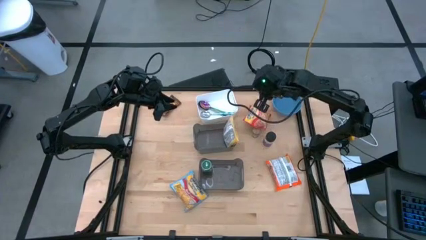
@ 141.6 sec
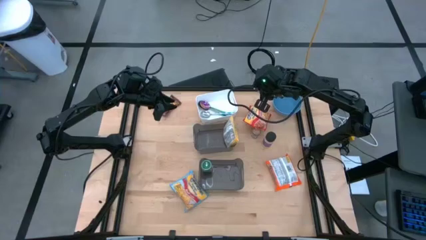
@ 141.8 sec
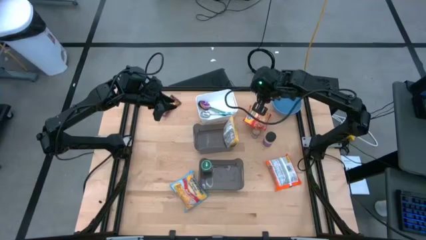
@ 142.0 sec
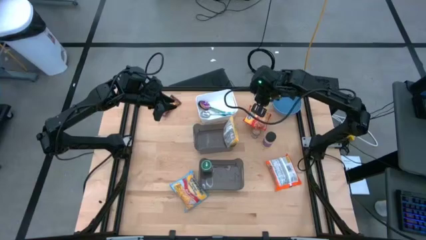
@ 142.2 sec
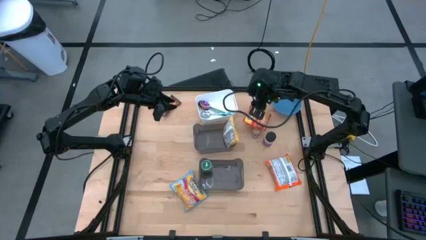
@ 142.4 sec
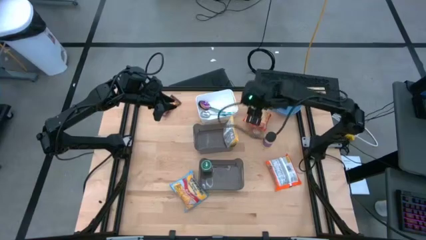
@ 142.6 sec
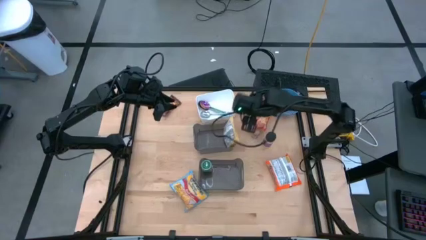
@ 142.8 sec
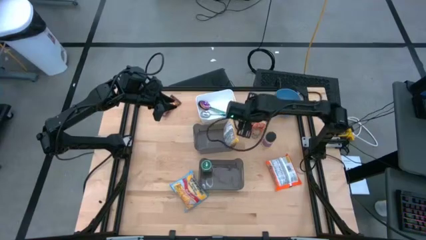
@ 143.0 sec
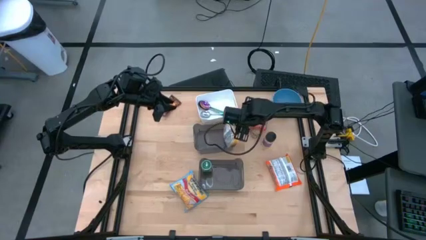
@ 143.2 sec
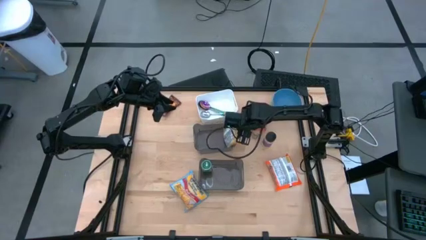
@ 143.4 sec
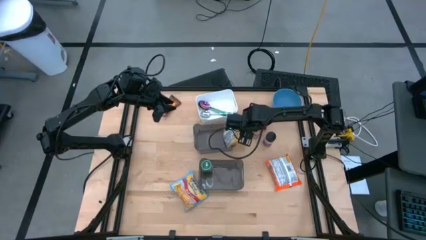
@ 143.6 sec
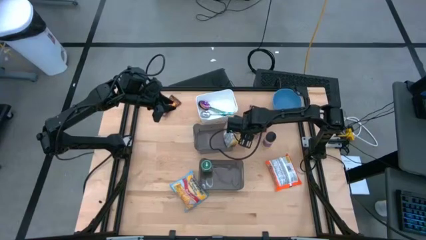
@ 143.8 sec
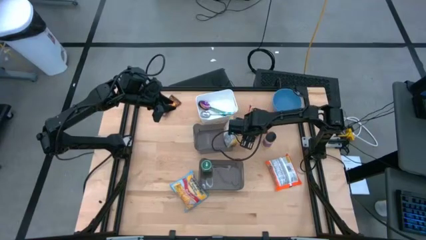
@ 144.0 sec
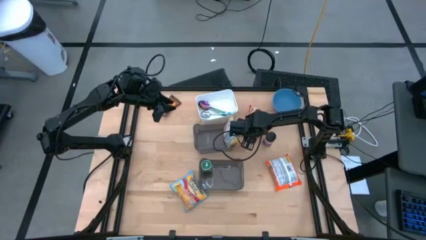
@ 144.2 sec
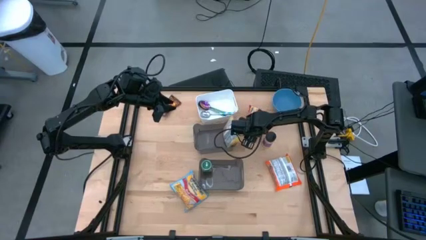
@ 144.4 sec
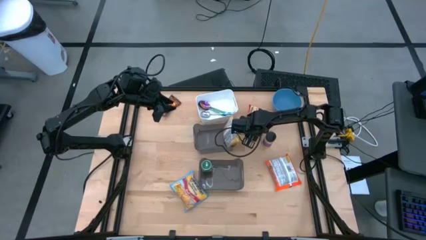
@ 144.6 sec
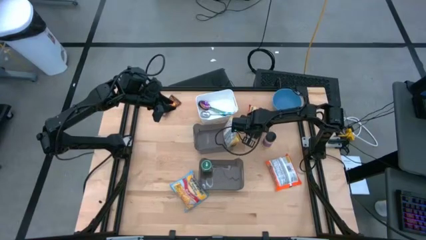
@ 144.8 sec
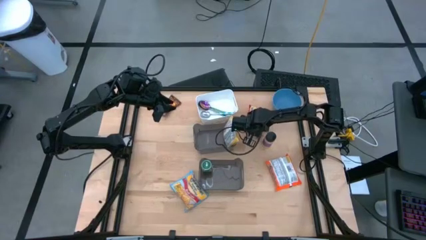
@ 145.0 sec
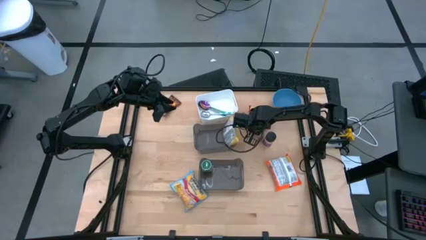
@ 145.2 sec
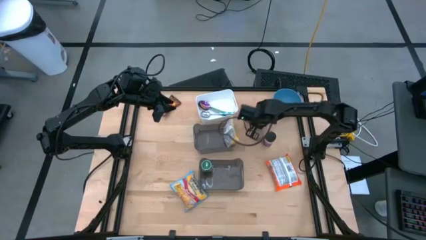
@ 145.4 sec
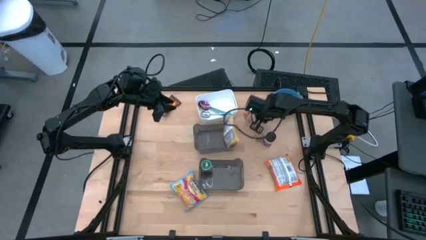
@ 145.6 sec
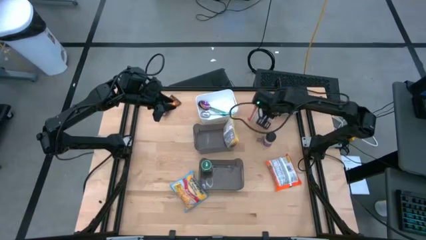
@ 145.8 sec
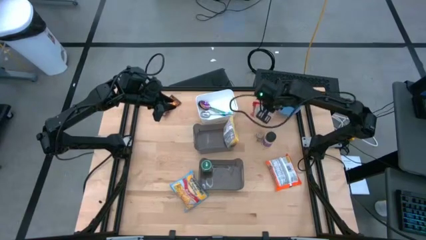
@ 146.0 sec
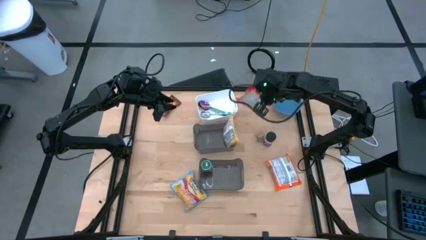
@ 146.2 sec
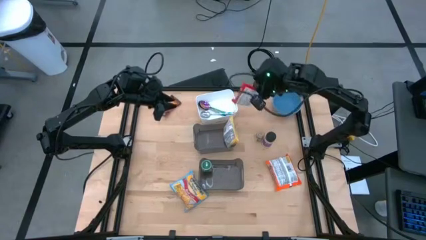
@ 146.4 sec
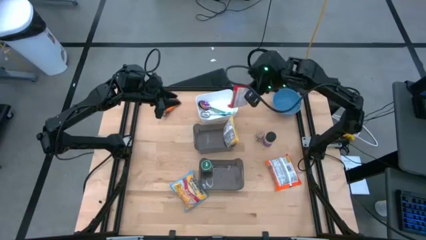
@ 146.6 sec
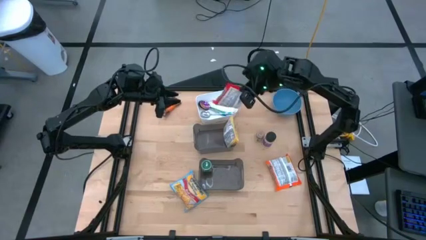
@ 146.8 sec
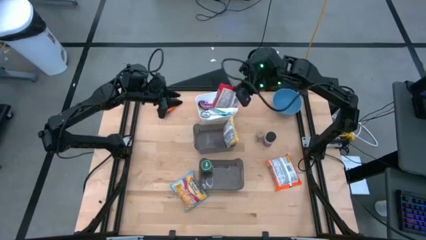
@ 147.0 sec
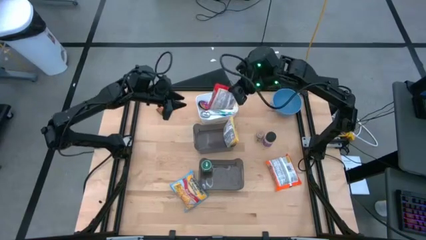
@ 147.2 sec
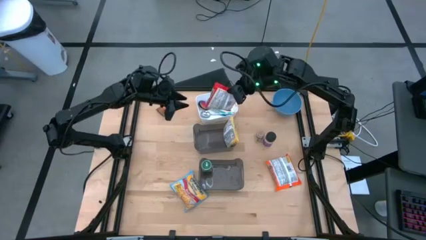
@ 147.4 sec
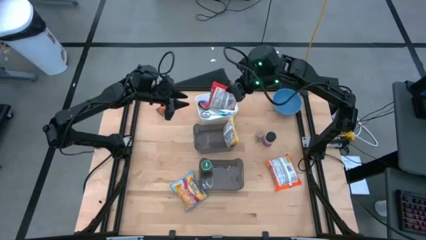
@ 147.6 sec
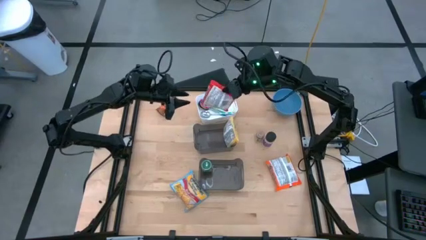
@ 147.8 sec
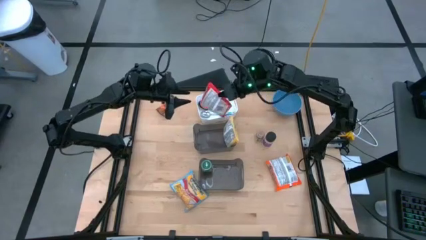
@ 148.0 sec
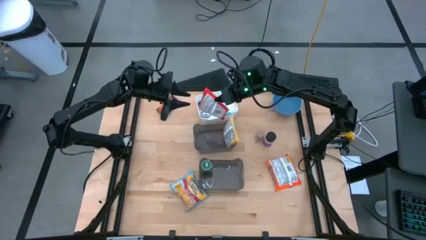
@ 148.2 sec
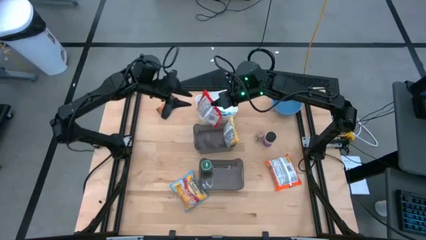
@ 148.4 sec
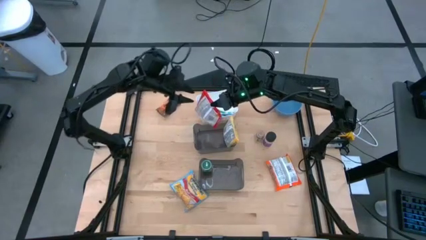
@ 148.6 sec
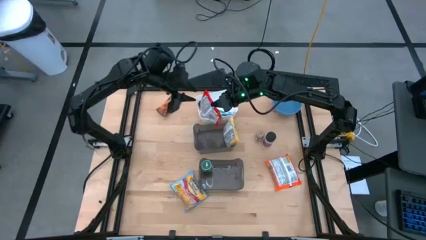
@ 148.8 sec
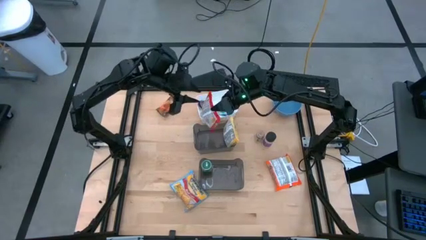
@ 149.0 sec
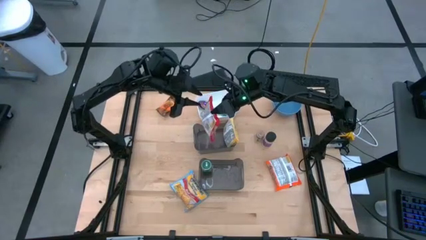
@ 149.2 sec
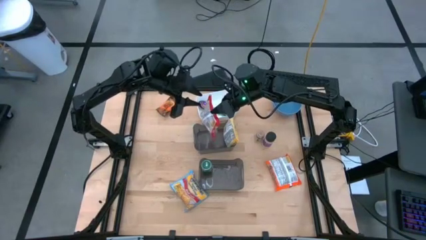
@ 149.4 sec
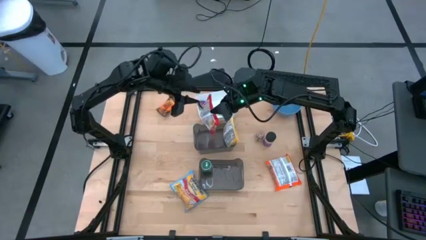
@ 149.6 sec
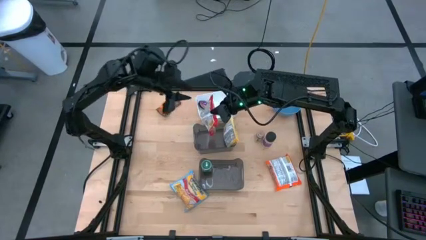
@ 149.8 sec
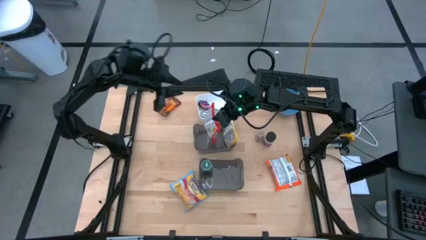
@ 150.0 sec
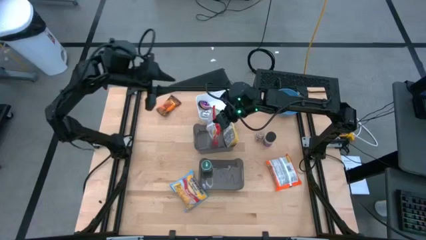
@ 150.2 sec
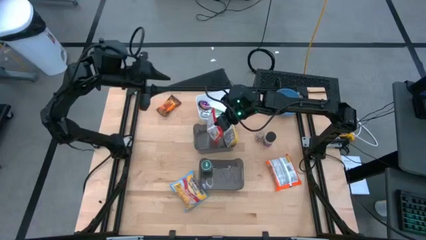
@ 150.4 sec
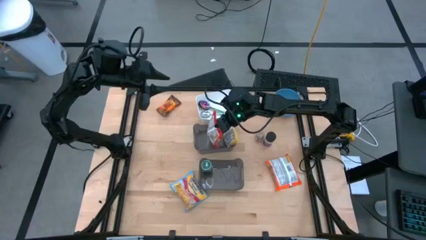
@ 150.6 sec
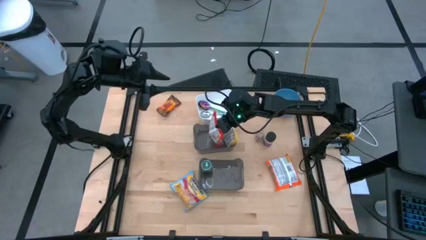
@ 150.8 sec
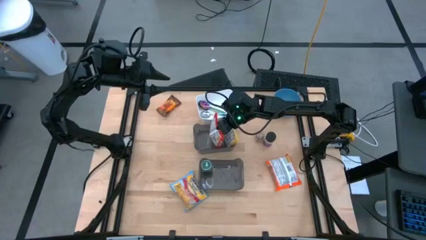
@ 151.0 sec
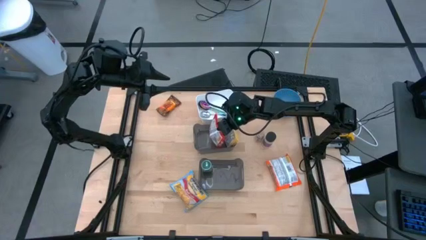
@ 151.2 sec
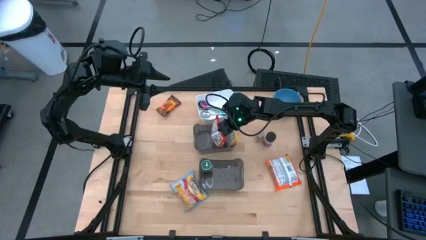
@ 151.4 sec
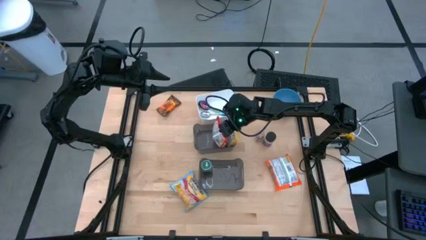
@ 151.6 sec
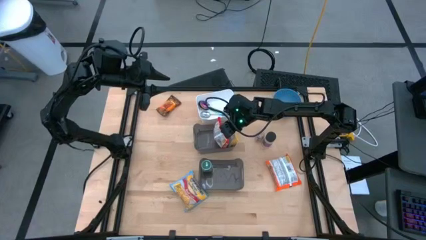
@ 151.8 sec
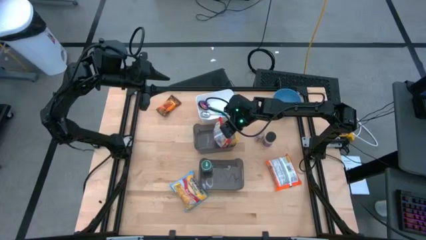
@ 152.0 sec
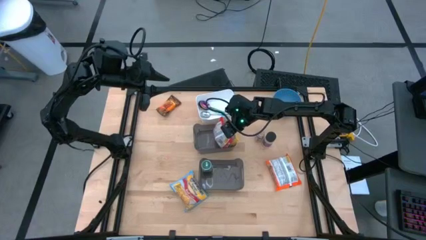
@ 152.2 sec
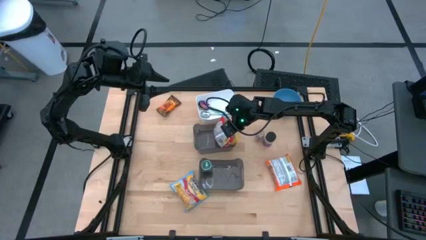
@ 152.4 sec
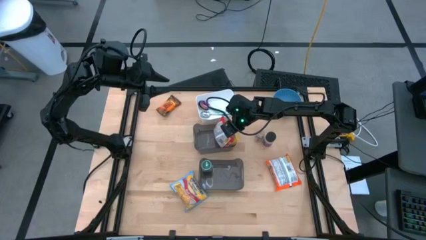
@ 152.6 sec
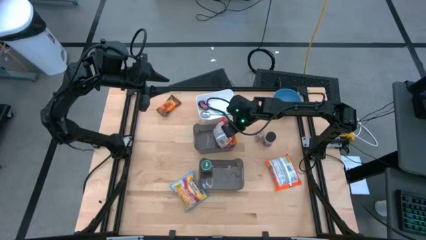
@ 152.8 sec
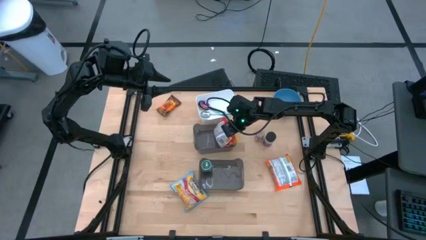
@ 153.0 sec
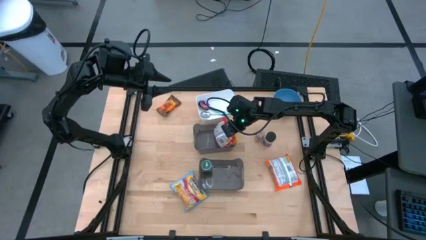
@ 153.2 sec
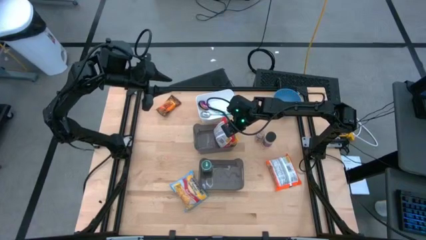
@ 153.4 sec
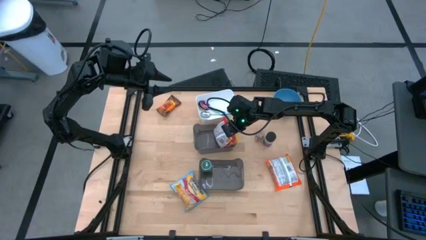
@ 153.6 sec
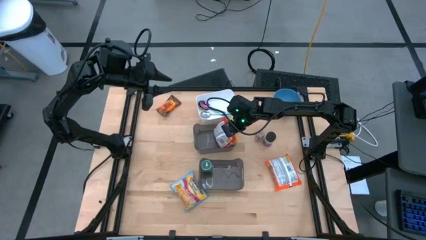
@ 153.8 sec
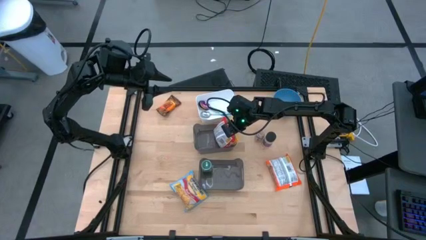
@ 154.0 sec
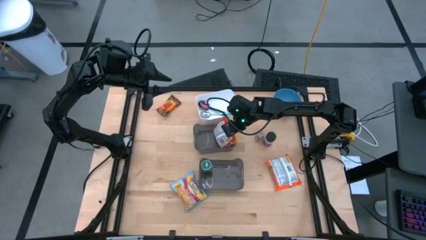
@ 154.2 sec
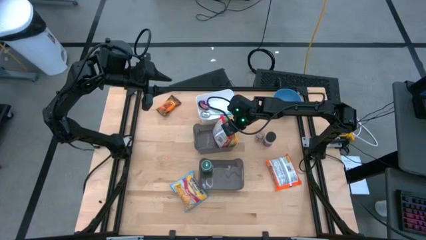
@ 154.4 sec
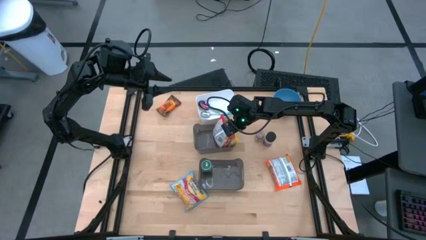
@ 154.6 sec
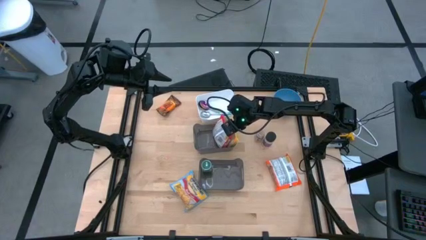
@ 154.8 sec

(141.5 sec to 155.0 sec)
Task: Pick & Place Food Item
Put the red noodle pack into the top black bin
